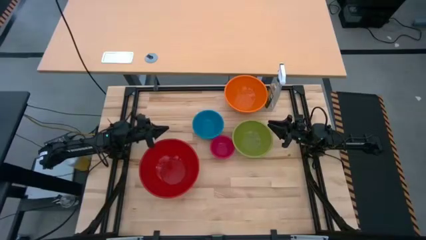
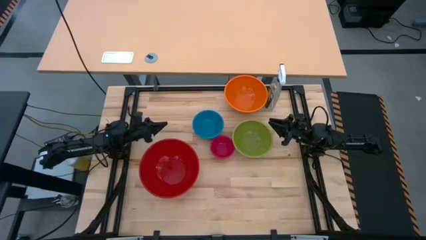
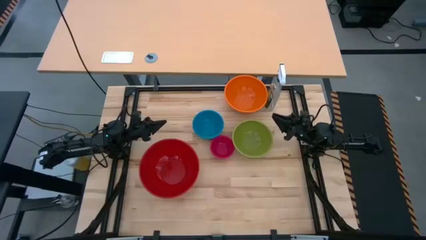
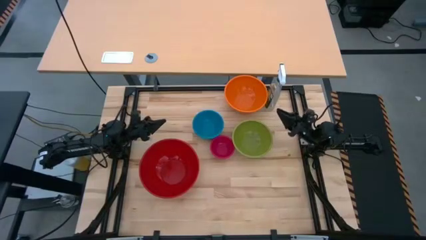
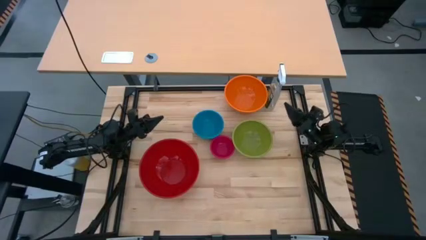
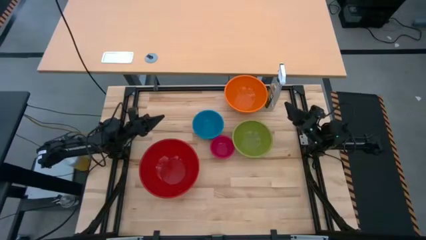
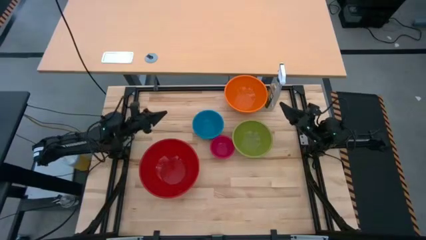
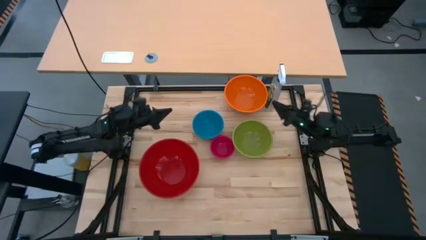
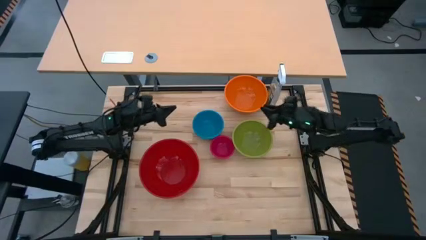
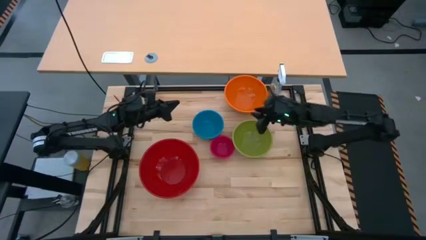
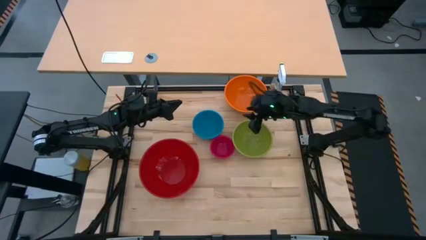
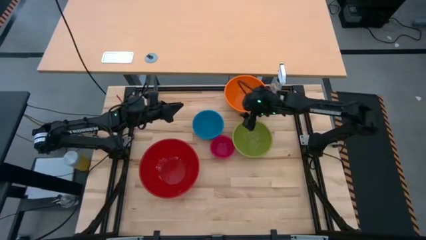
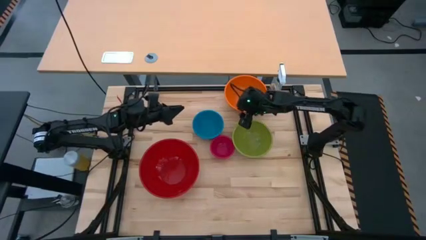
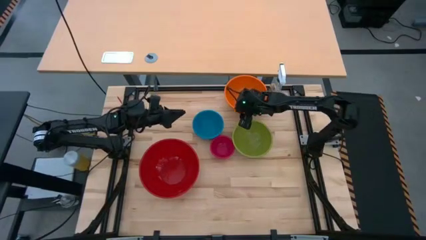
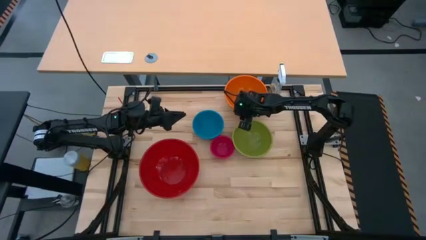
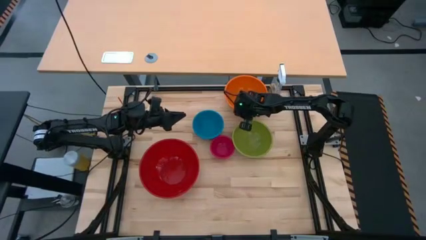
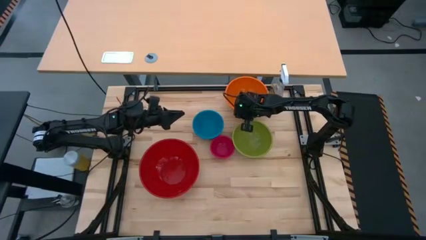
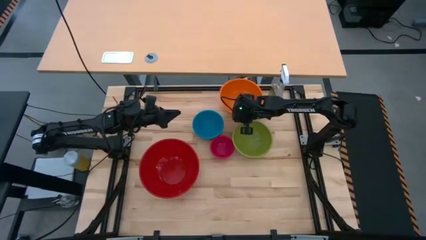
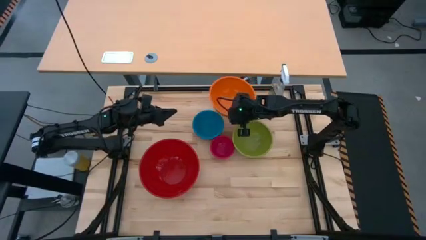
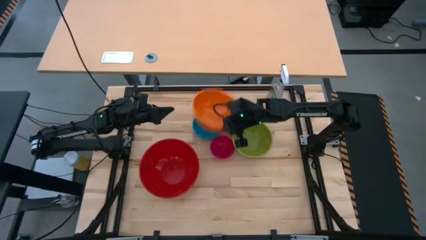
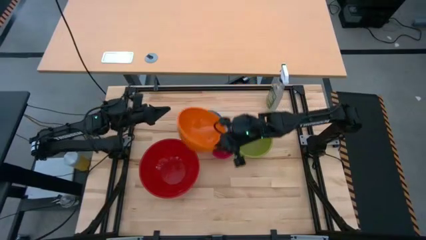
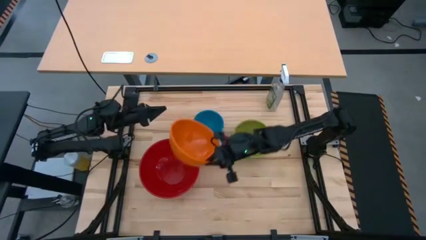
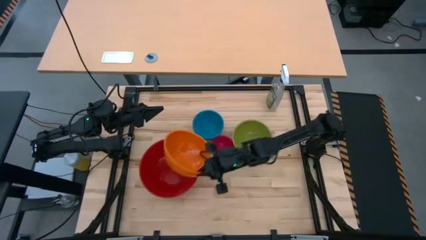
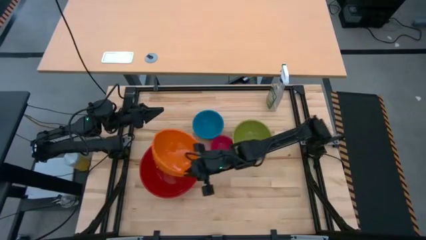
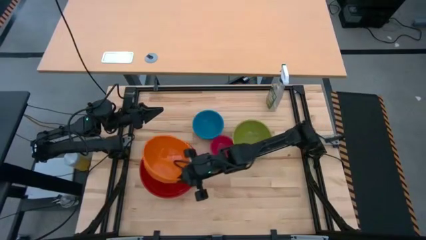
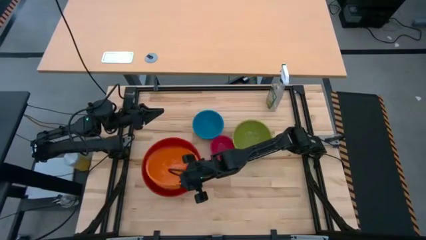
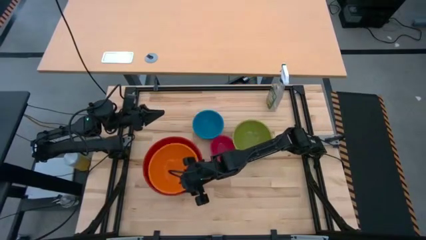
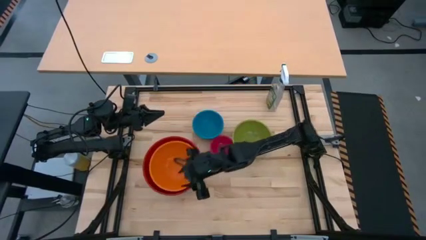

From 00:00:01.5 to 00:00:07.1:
Stack the orange bowl on the red bowl

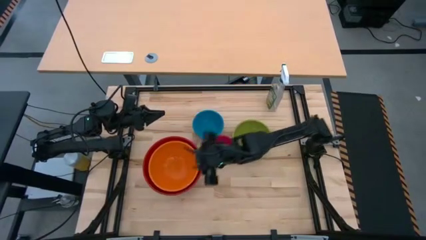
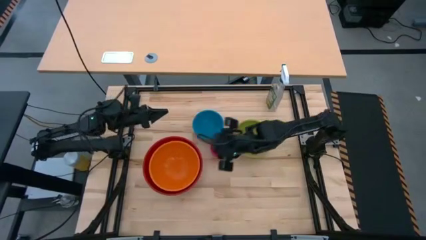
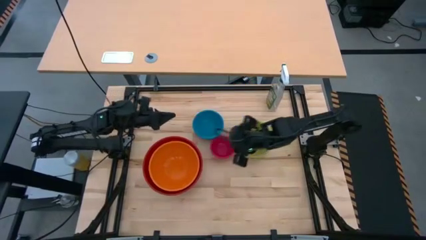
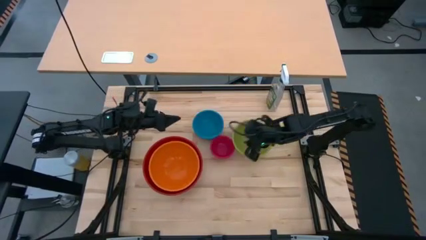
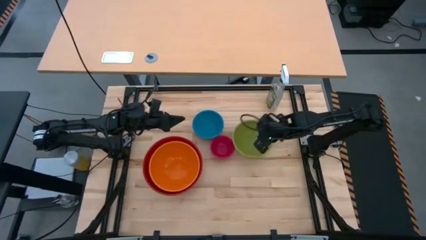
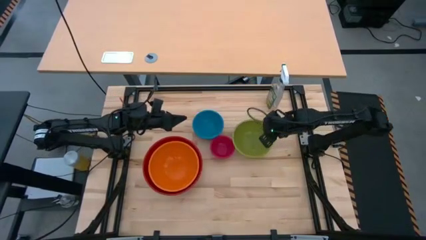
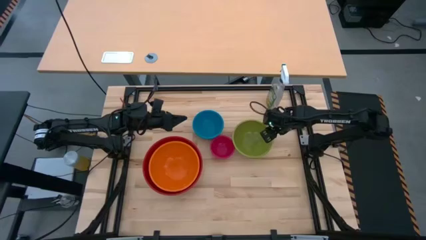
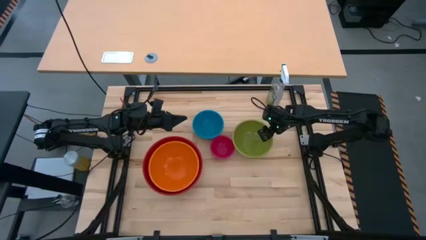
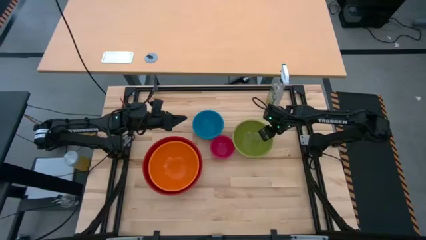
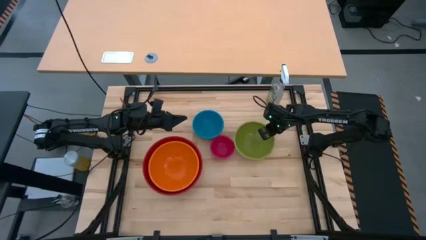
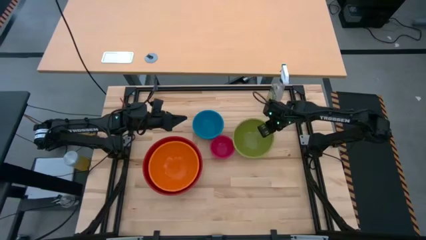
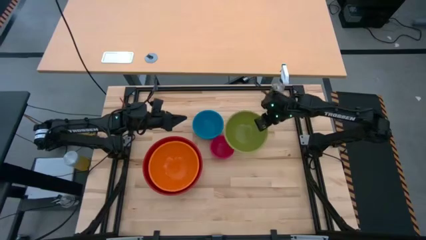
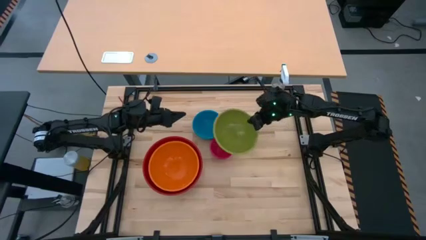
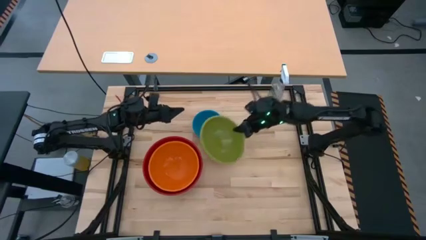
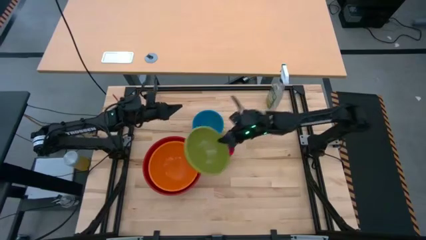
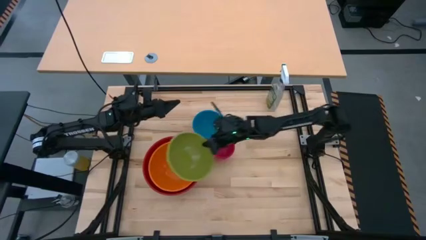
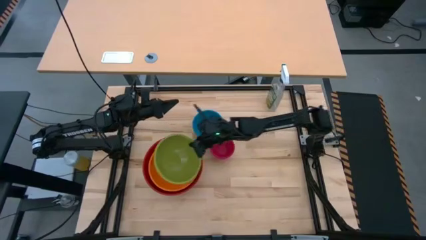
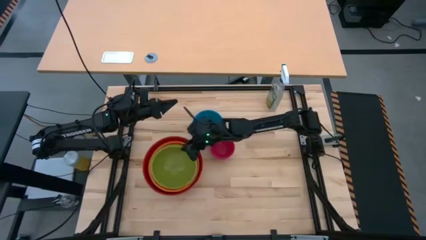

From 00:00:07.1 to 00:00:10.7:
Stack the green bowl on the orange bowl

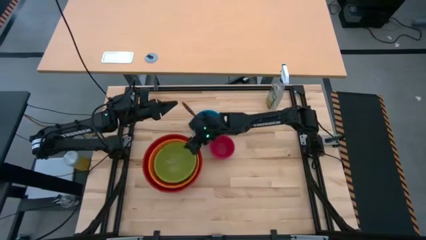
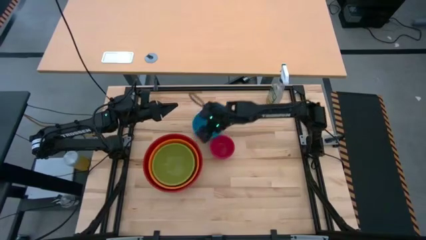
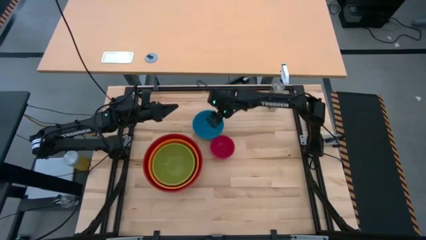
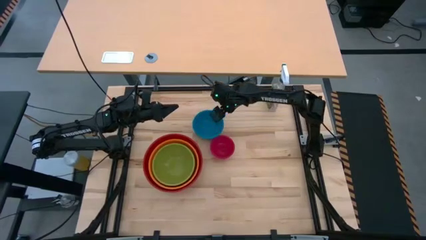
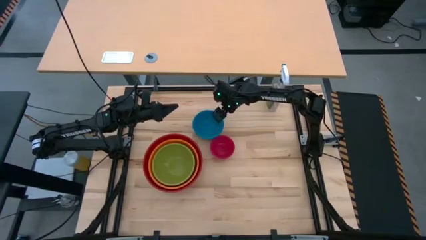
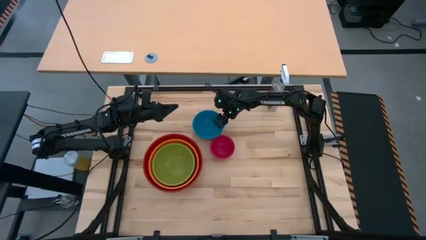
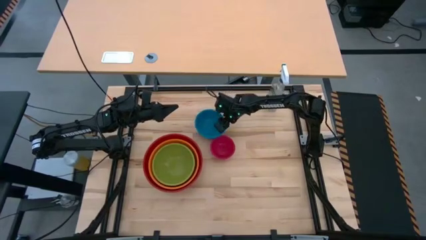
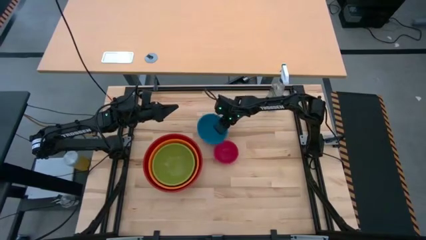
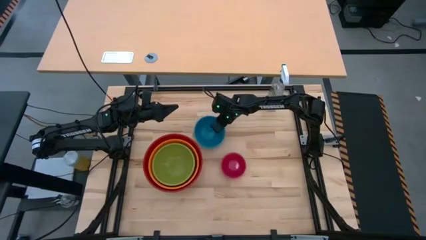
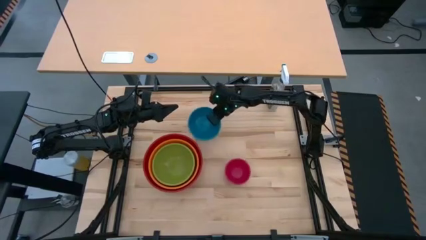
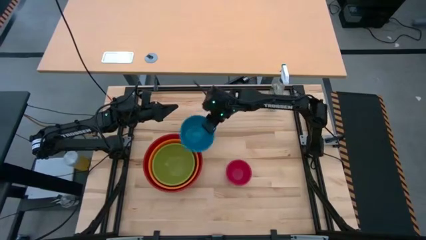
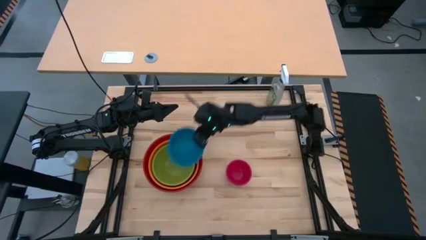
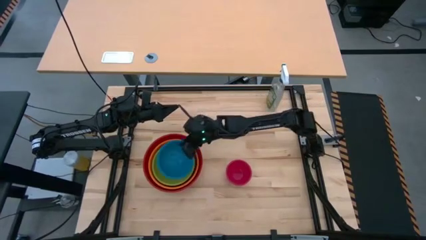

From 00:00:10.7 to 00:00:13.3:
Stack the blue bowl on the green bowl

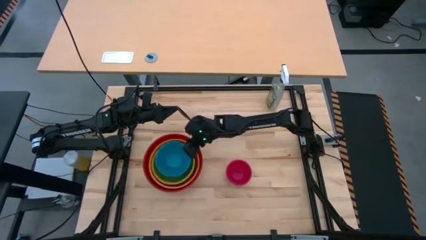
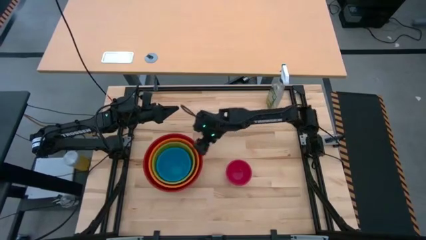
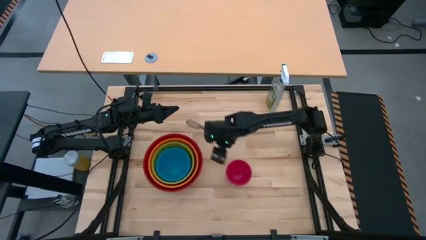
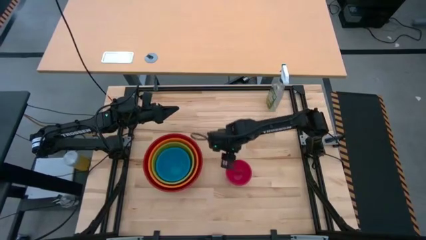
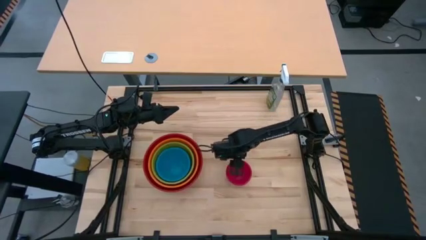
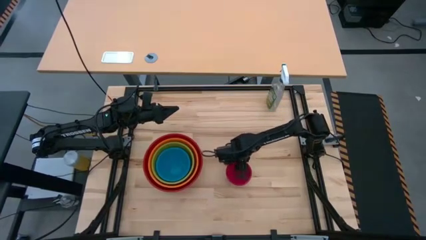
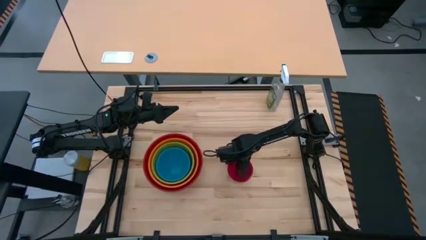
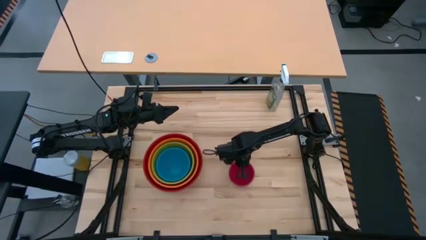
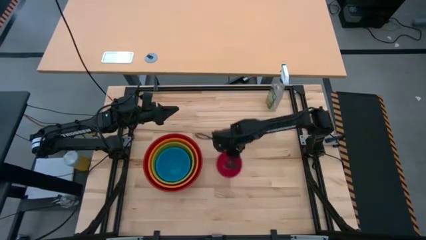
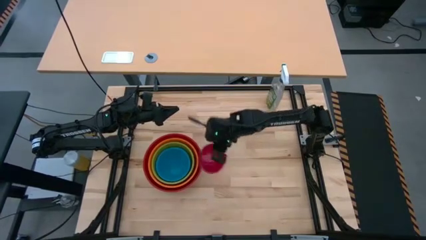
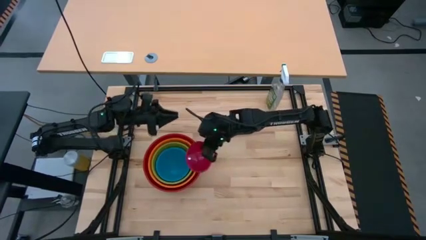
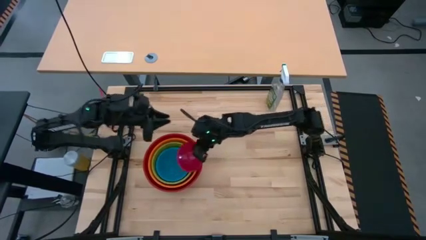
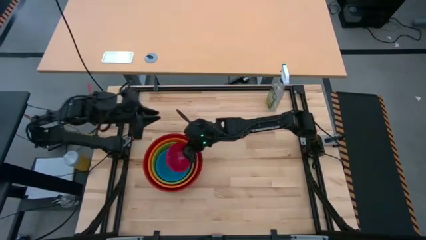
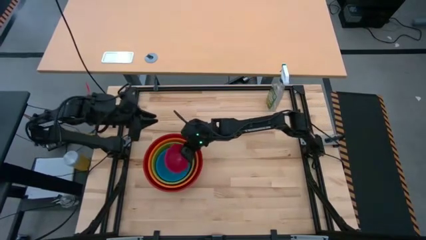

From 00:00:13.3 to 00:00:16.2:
Stack the pink bowl on the blue bowl
